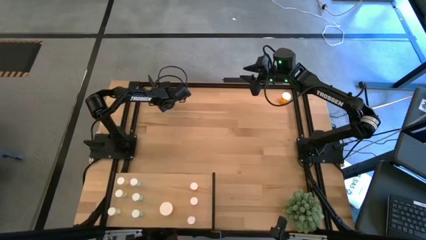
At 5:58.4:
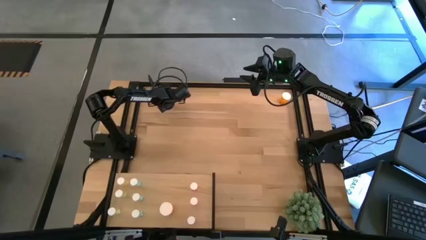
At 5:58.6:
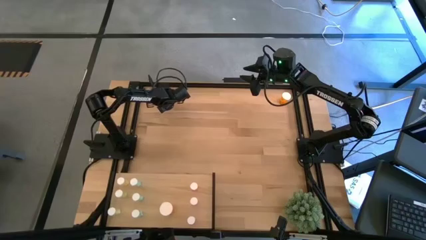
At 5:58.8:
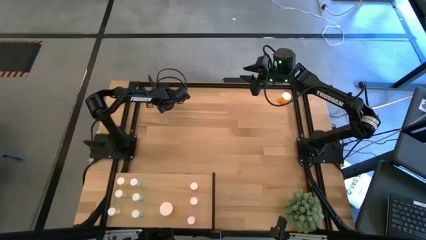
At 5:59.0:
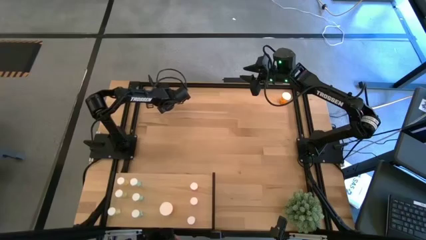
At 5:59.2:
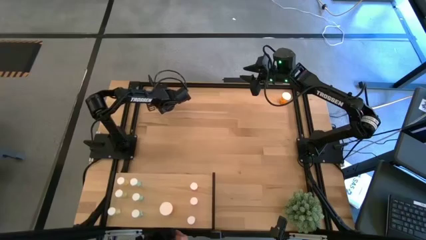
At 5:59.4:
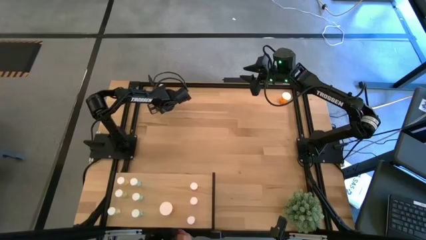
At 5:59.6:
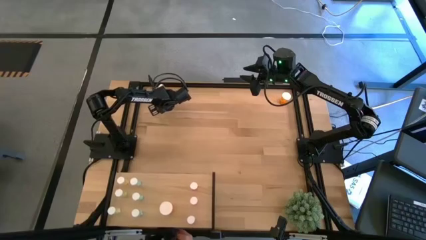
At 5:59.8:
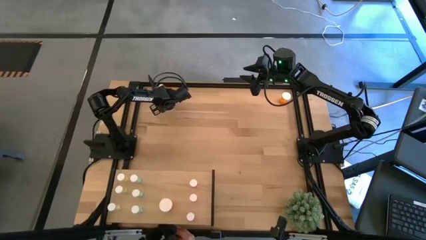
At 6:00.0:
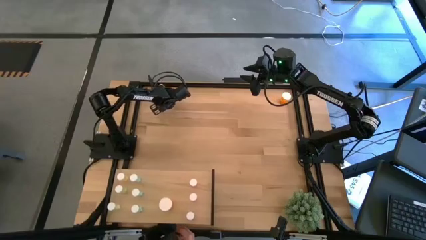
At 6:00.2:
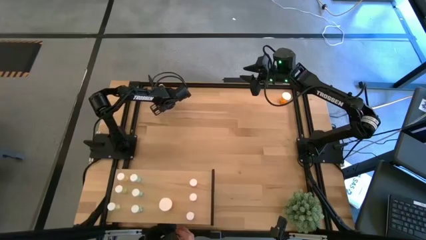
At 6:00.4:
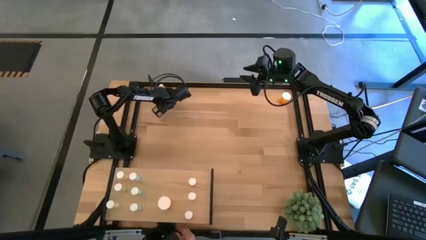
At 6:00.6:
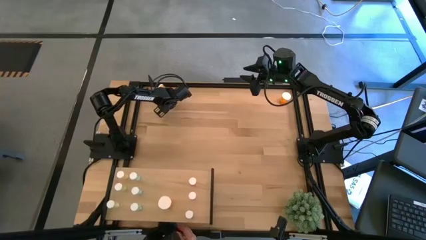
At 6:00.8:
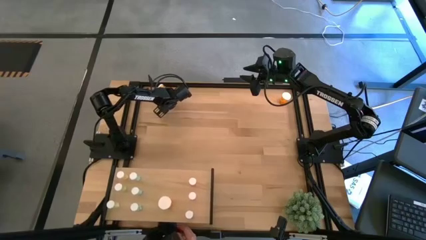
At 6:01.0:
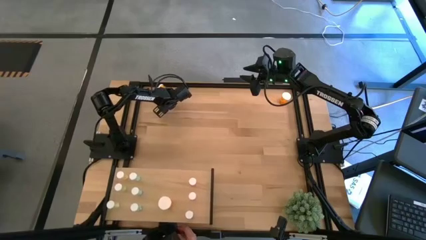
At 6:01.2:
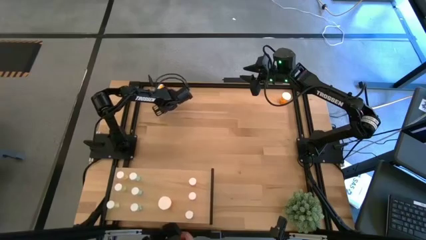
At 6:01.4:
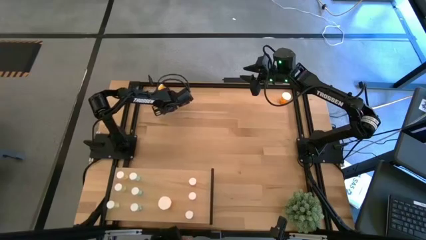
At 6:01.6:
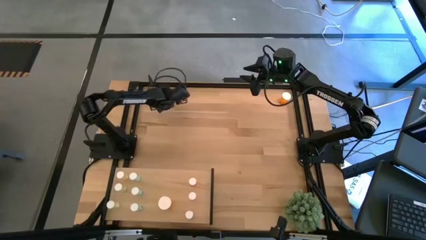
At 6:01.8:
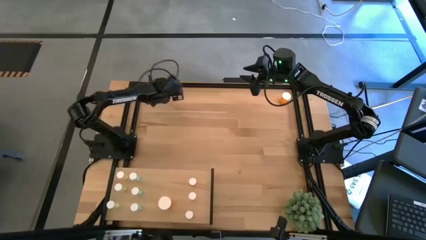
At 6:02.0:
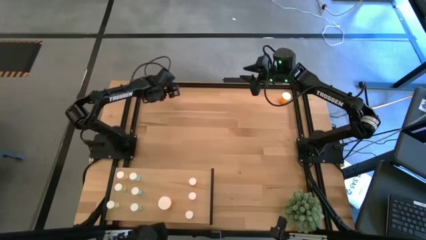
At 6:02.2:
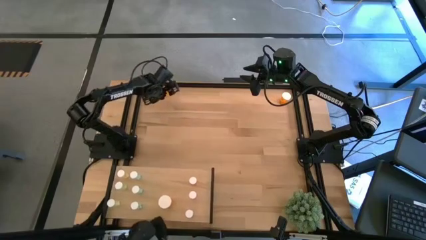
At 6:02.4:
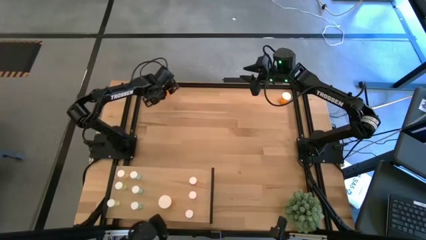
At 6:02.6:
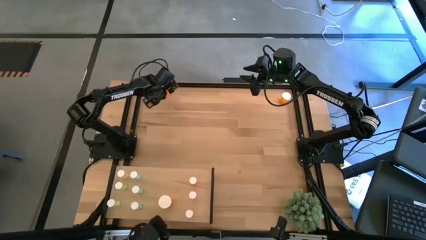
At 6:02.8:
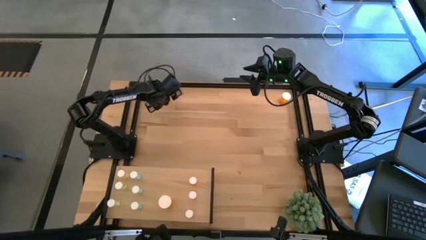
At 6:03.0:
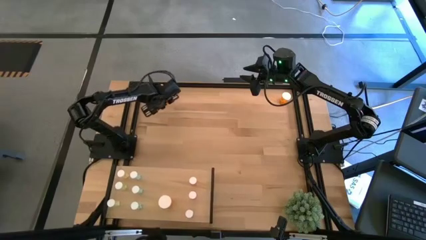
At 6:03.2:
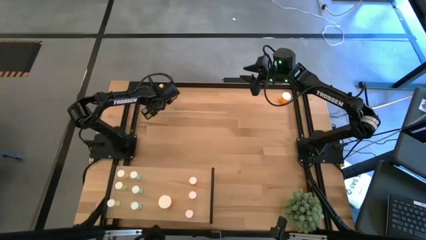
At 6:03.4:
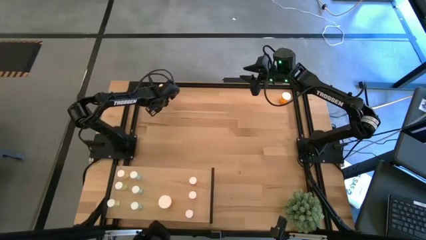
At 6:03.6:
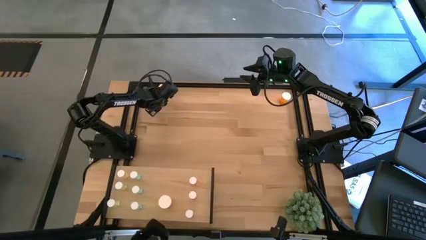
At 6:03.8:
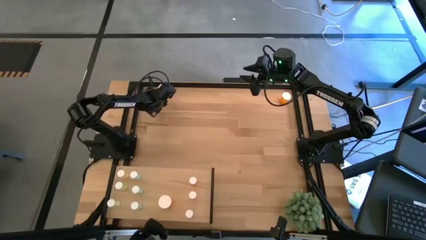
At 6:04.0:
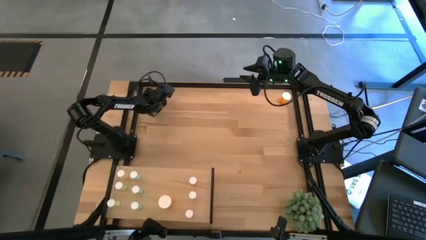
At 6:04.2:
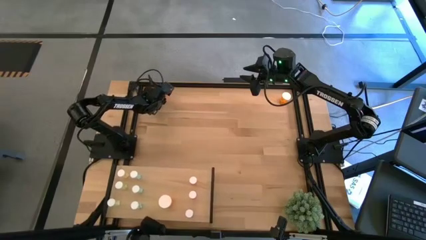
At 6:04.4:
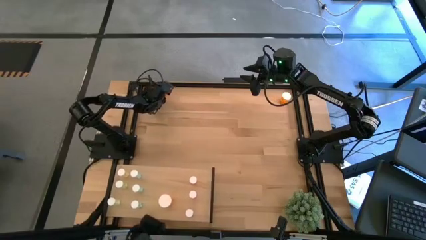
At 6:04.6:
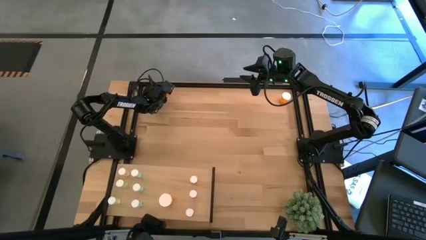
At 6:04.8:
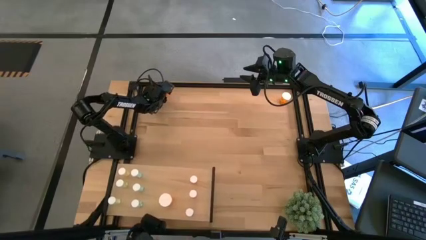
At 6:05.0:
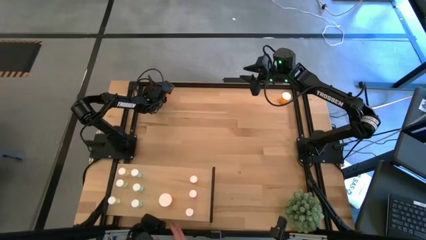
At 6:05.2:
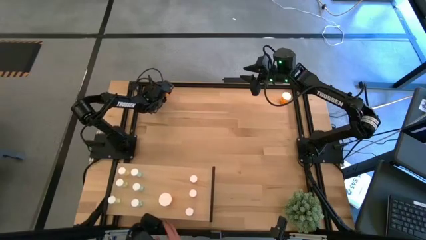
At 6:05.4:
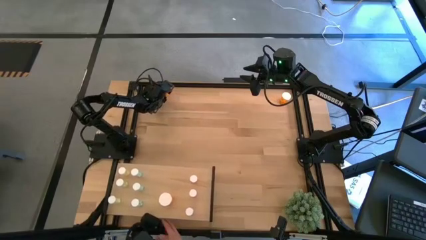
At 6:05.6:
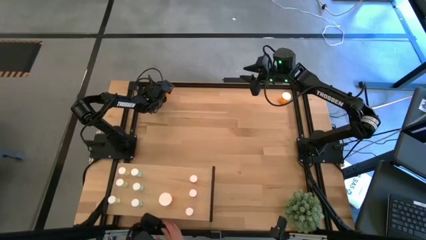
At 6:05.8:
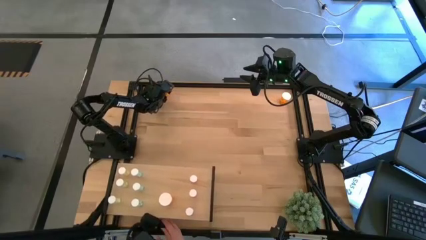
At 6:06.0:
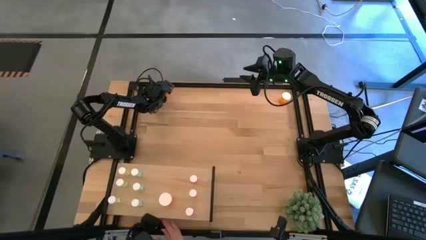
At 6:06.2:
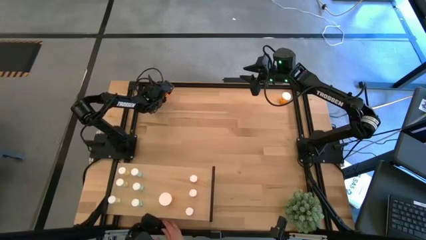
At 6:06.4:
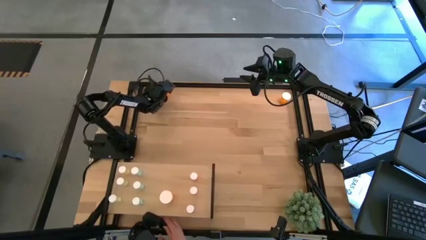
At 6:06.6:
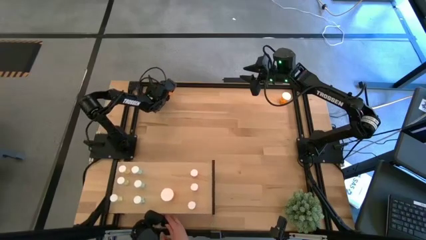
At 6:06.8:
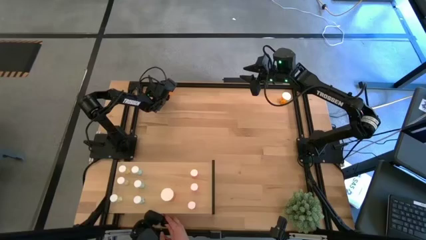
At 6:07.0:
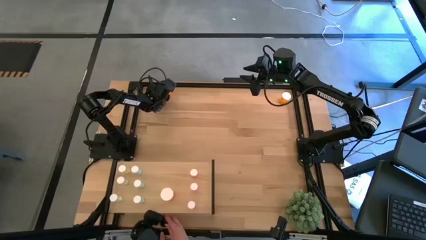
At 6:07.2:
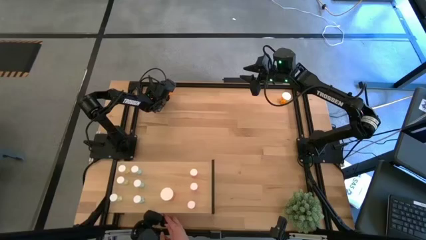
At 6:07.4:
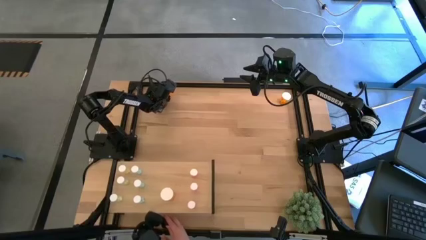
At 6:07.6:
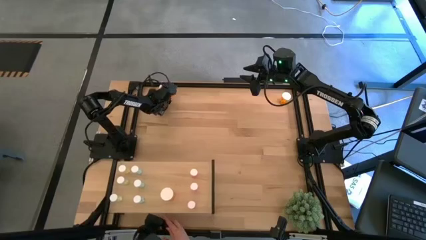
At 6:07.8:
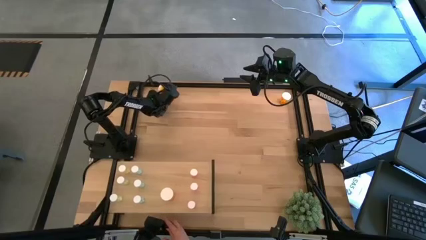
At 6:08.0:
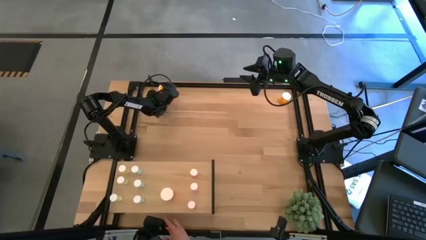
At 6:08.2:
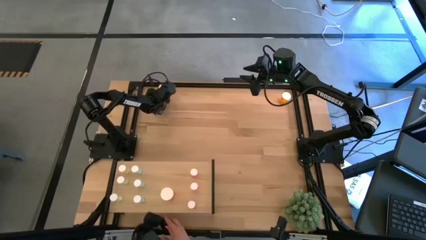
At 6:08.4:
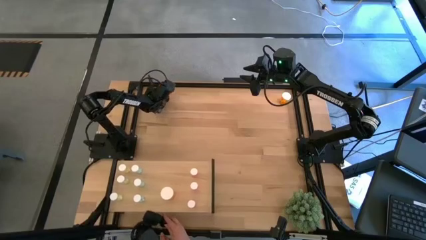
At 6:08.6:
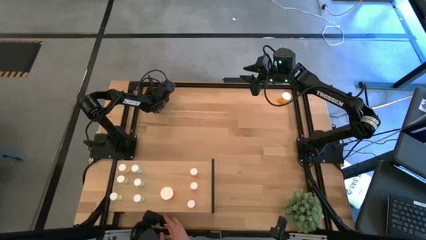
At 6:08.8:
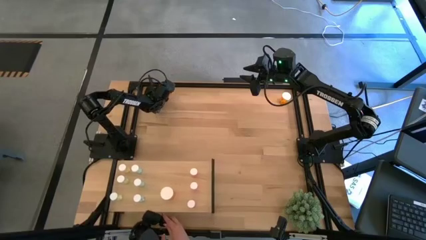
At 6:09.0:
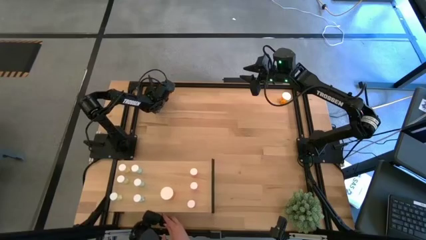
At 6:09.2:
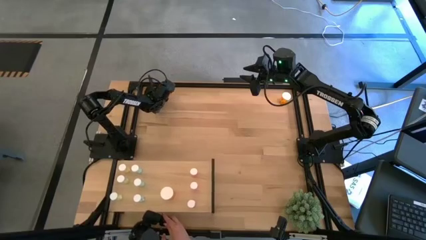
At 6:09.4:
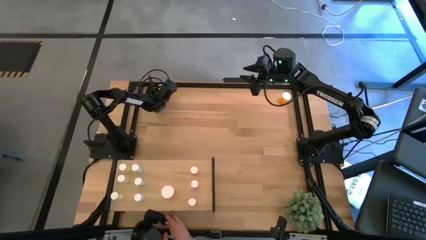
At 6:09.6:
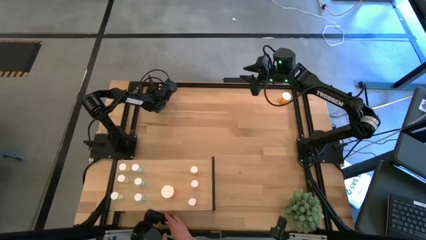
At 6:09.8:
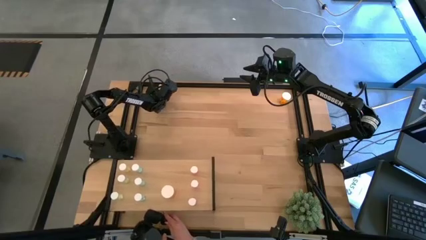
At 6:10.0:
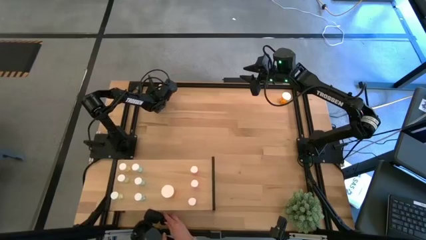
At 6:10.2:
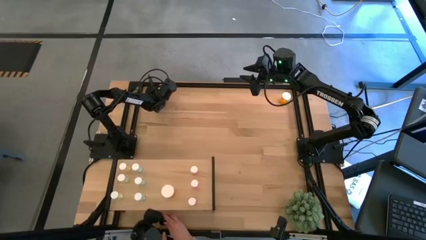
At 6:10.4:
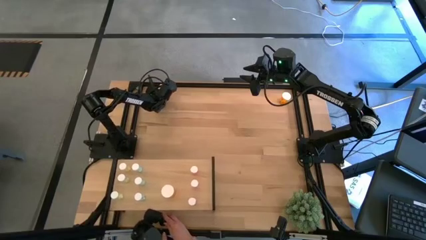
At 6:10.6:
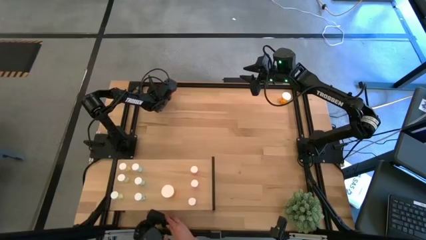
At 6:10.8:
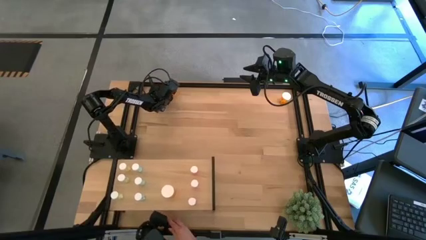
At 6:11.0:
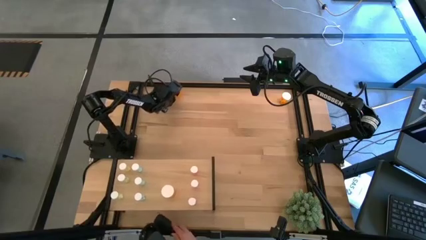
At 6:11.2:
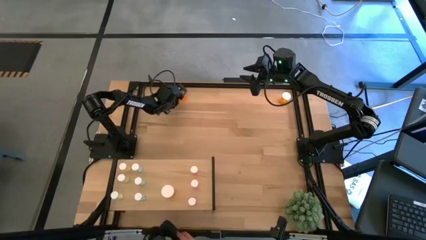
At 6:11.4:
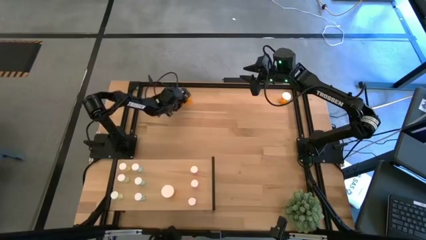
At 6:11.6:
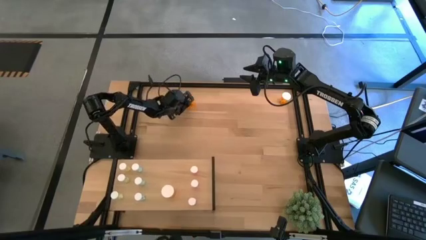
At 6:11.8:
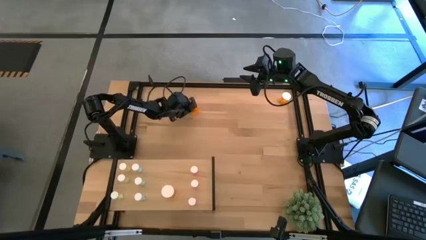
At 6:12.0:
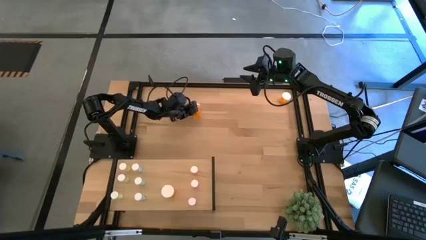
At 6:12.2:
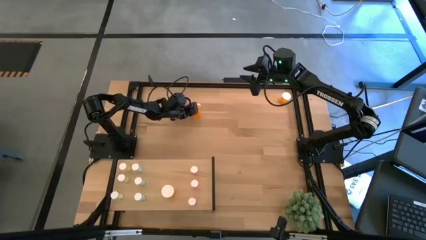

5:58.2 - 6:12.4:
Task: Pick and place medicine bottles onto shelf by color
Put the top left orange pill bottle on the shelf aligned with the other orange pill bottle

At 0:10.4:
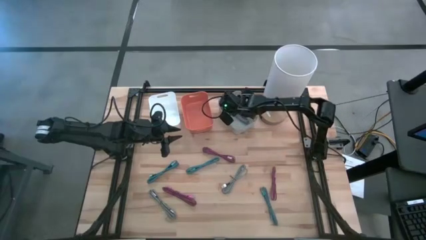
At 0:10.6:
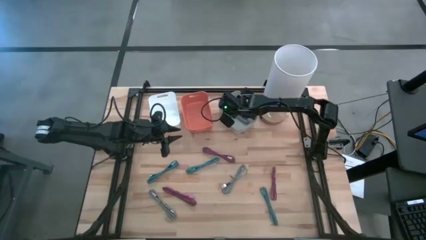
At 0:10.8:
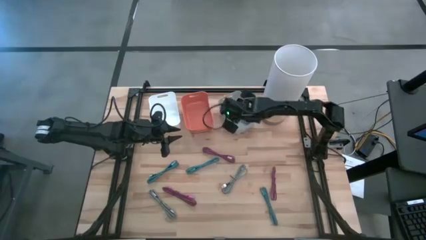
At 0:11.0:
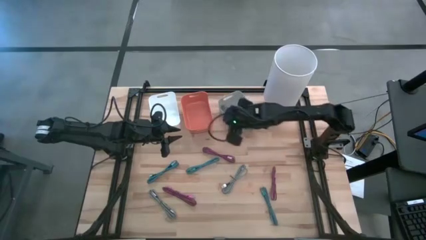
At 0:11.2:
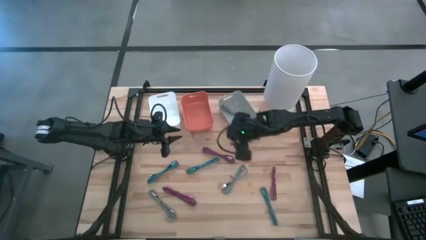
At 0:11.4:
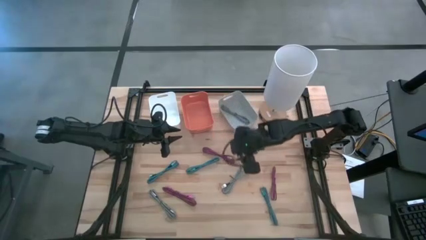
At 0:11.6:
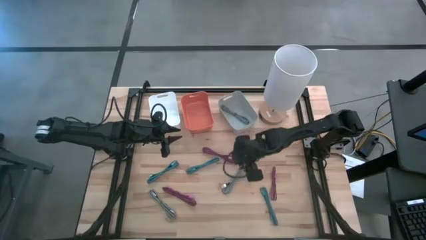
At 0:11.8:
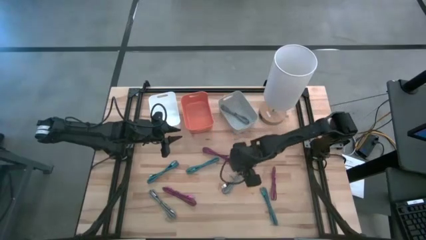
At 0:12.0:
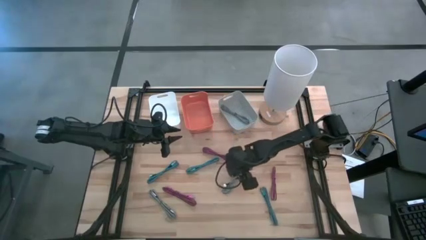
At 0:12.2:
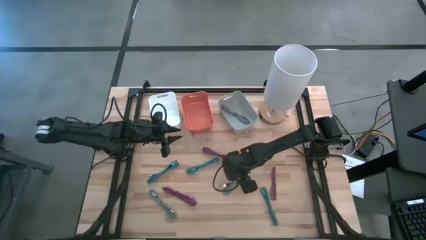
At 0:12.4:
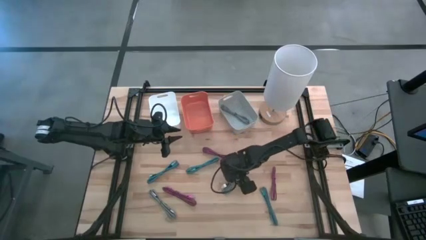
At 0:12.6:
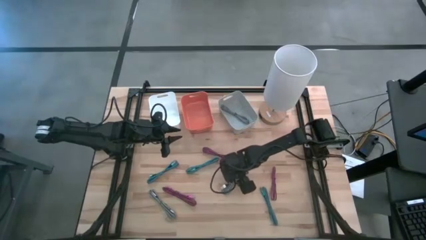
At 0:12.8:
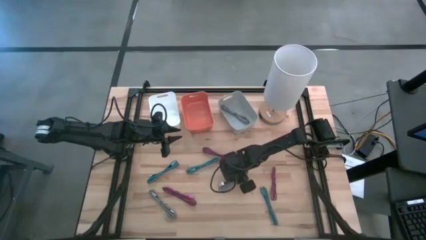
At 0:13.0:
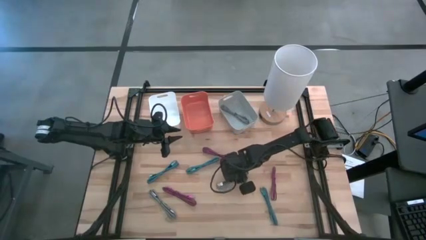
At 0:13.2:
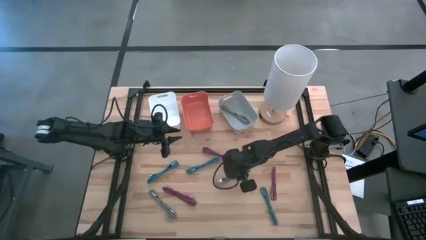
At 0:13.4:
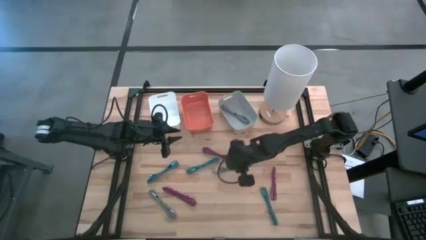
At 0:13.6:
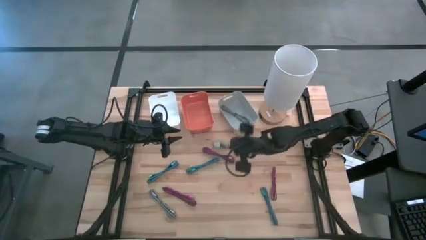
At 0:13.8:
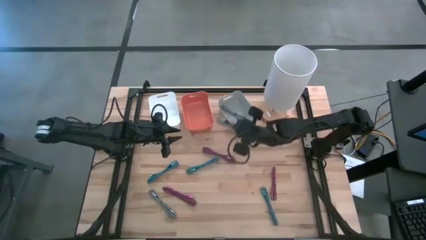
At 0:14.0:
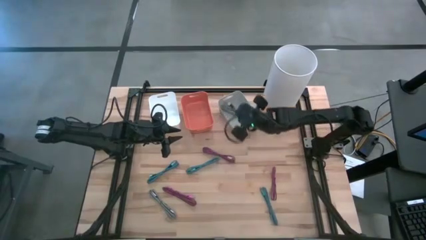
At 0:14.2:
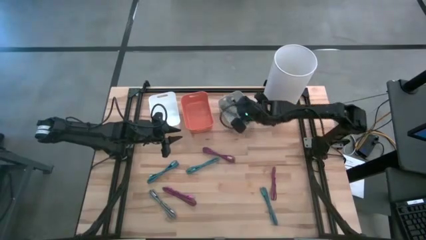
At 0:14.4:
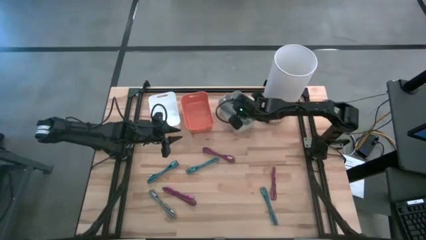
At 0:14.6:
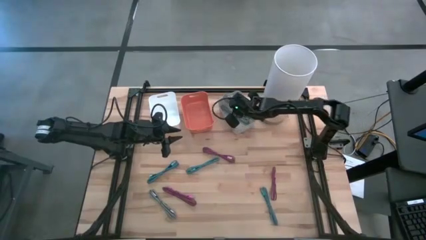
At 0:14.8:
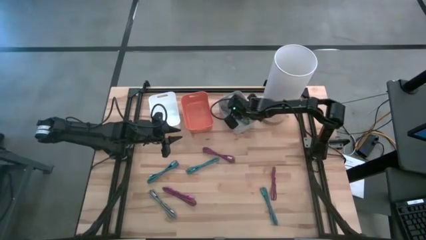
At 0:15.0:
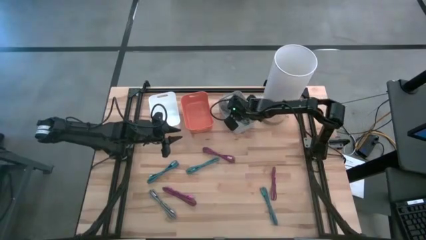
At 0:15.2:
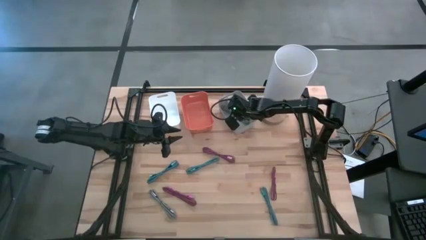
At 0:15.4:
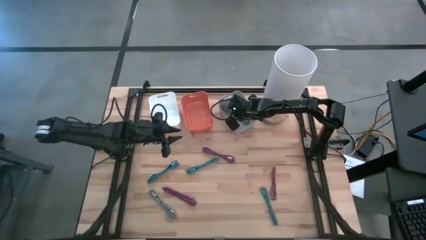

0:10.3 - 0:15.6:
Task: Pick & Place USB Port
Put the right black and white USB cable into the gray bin
